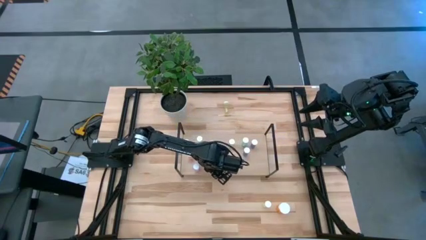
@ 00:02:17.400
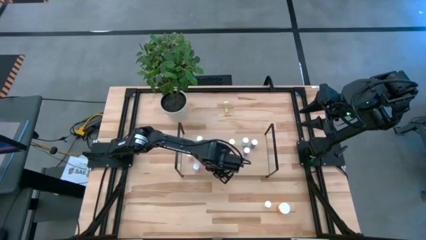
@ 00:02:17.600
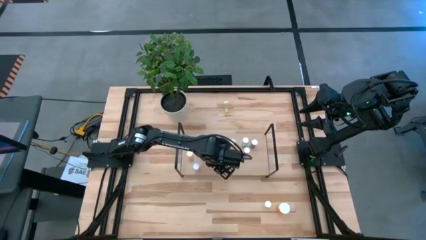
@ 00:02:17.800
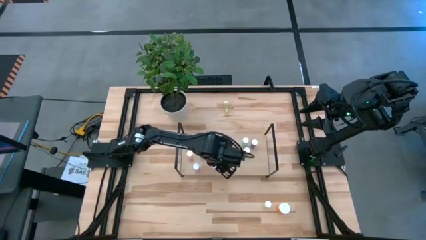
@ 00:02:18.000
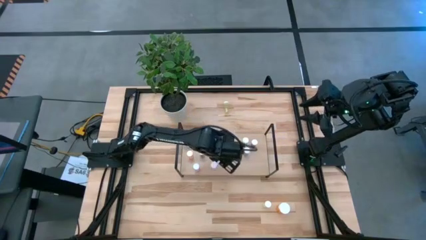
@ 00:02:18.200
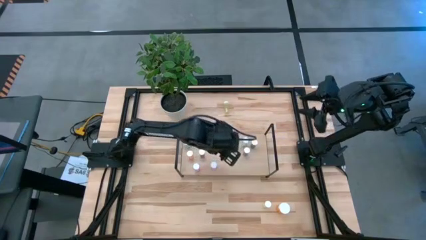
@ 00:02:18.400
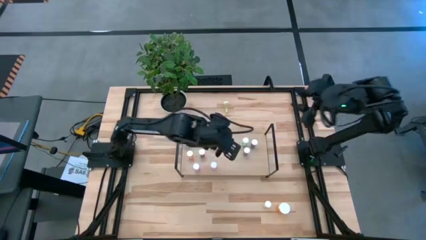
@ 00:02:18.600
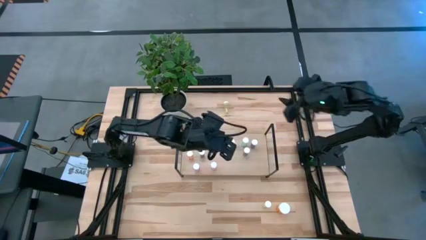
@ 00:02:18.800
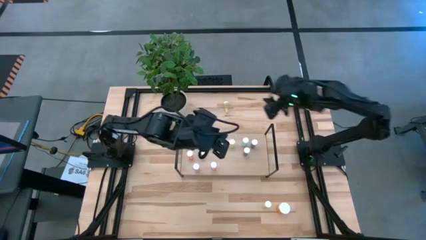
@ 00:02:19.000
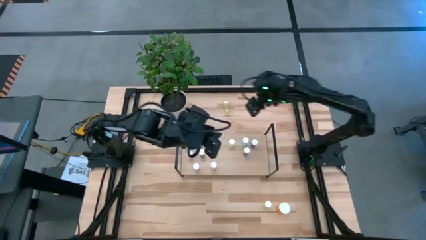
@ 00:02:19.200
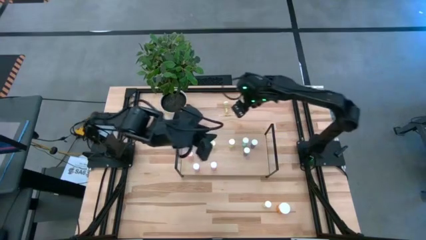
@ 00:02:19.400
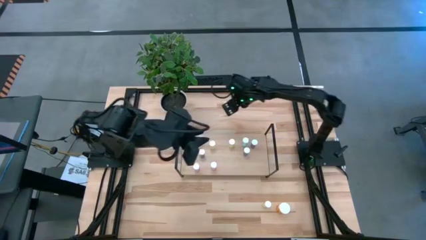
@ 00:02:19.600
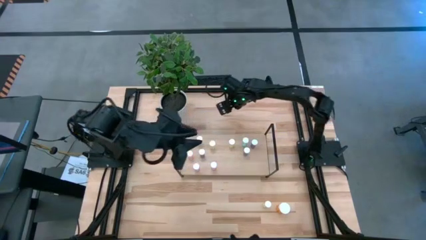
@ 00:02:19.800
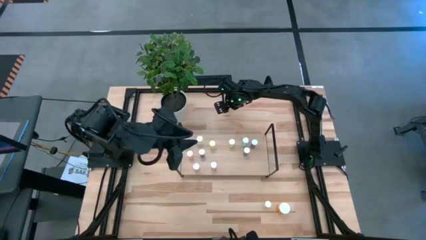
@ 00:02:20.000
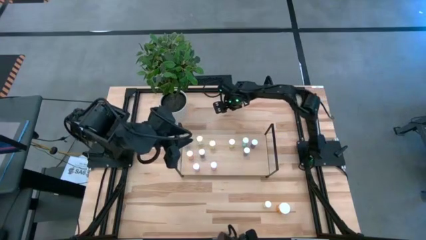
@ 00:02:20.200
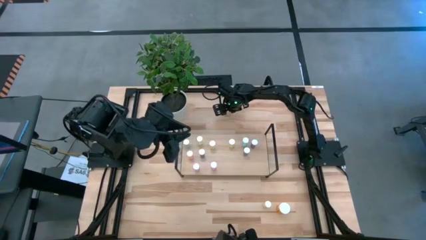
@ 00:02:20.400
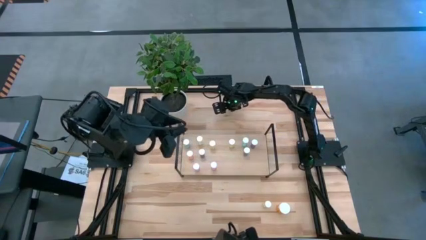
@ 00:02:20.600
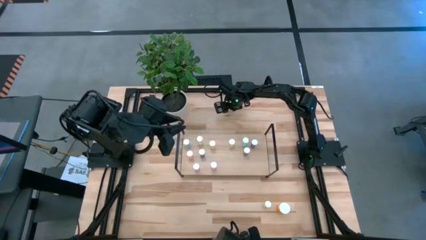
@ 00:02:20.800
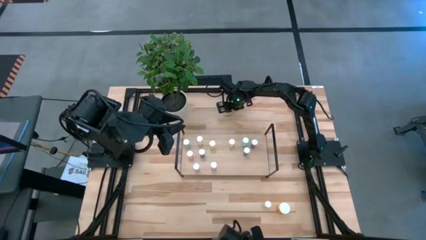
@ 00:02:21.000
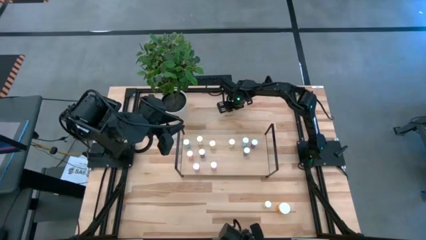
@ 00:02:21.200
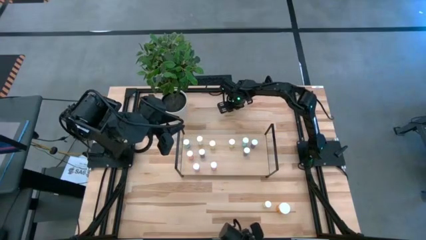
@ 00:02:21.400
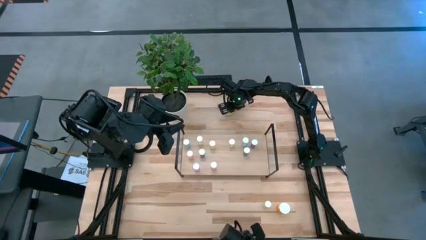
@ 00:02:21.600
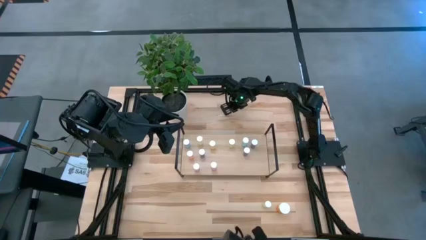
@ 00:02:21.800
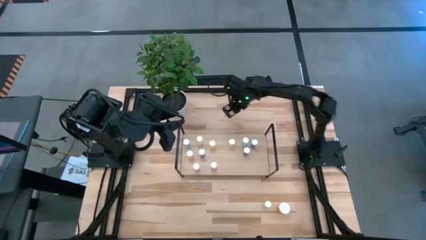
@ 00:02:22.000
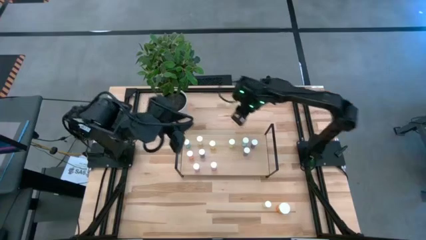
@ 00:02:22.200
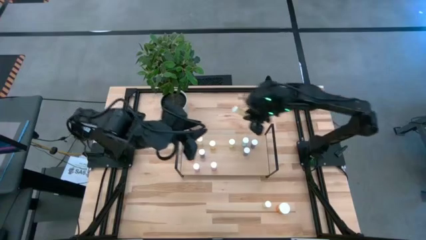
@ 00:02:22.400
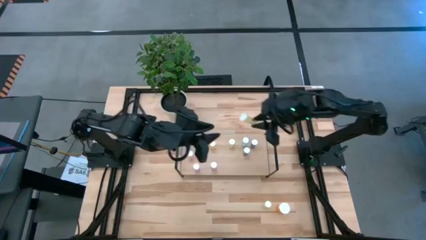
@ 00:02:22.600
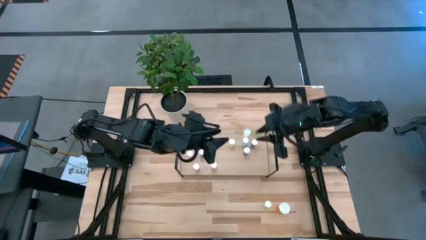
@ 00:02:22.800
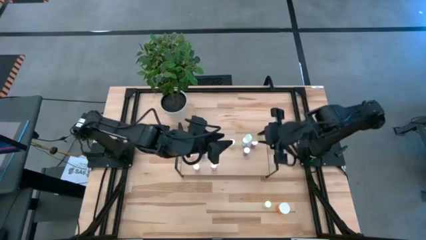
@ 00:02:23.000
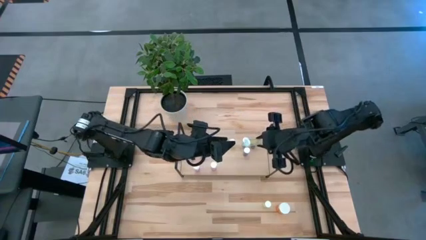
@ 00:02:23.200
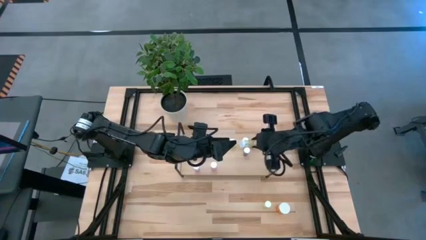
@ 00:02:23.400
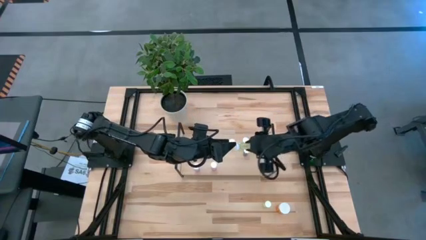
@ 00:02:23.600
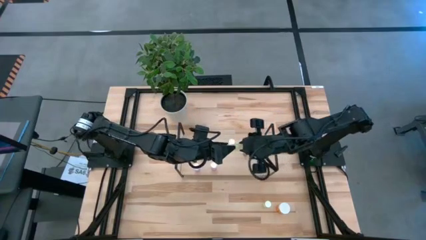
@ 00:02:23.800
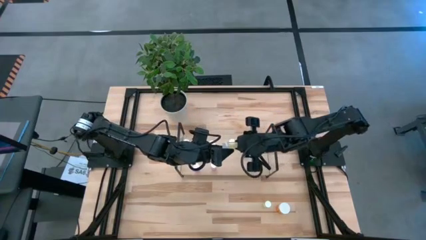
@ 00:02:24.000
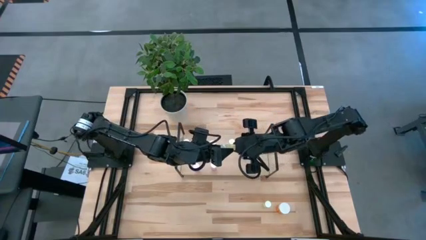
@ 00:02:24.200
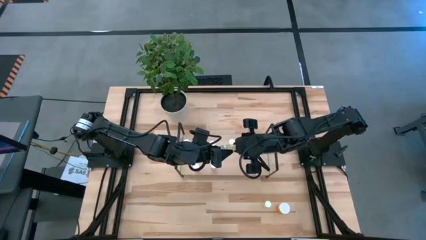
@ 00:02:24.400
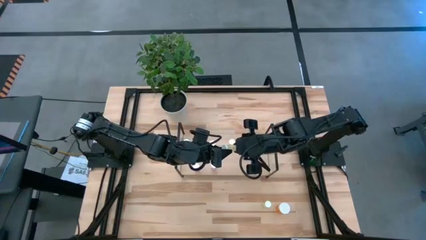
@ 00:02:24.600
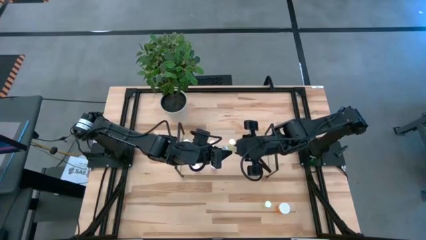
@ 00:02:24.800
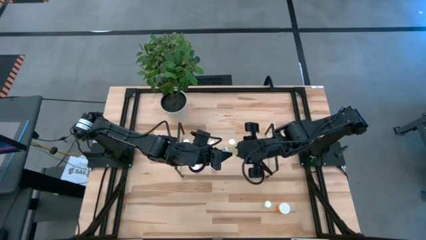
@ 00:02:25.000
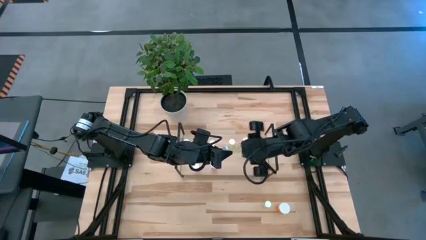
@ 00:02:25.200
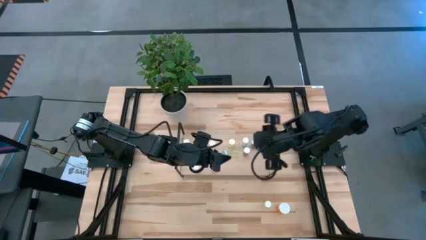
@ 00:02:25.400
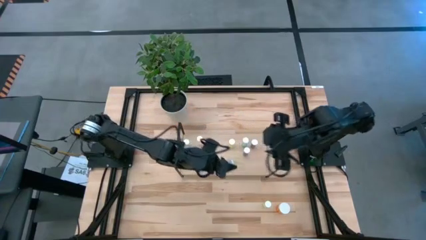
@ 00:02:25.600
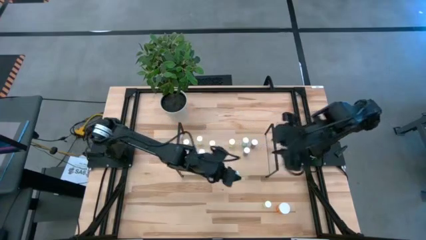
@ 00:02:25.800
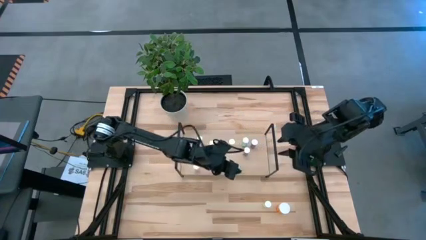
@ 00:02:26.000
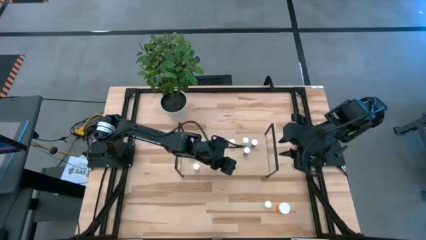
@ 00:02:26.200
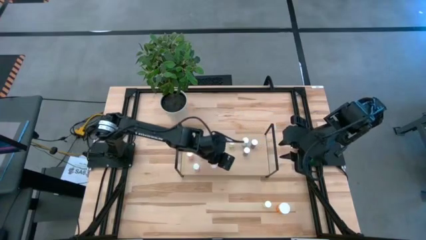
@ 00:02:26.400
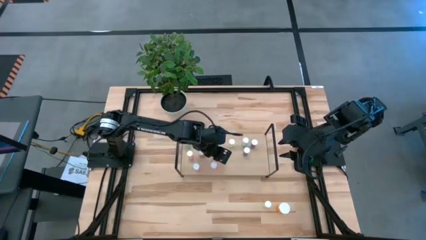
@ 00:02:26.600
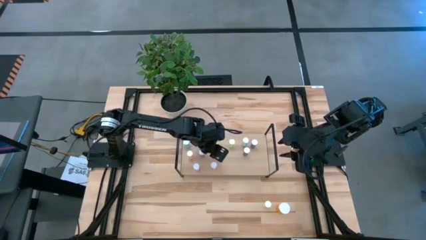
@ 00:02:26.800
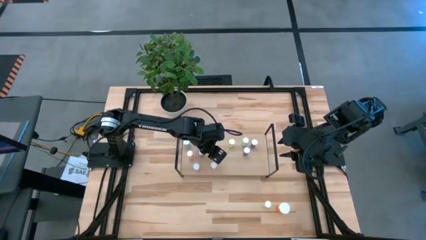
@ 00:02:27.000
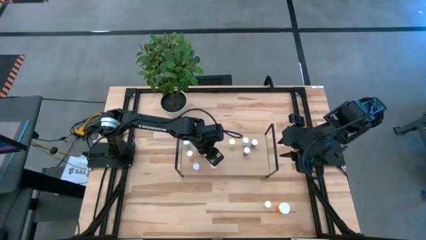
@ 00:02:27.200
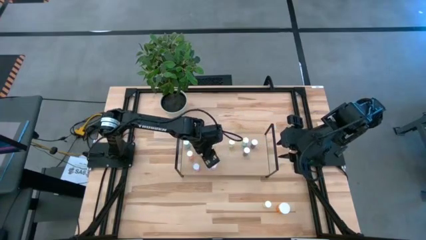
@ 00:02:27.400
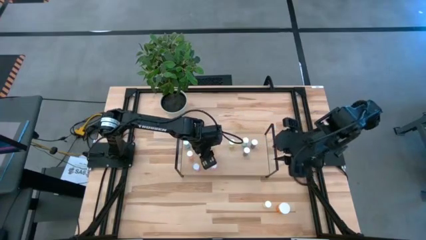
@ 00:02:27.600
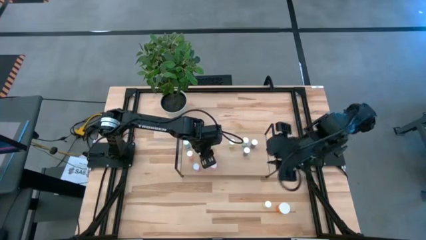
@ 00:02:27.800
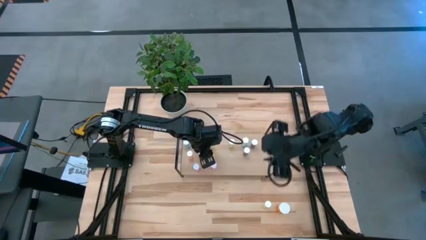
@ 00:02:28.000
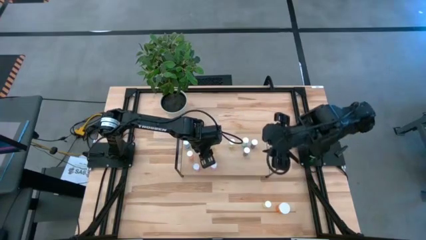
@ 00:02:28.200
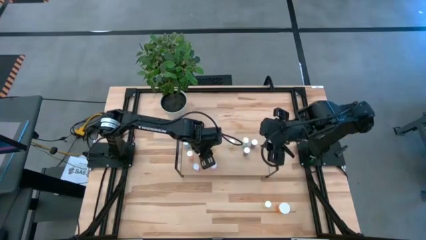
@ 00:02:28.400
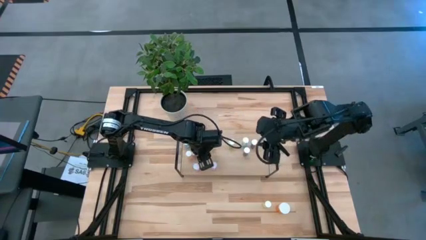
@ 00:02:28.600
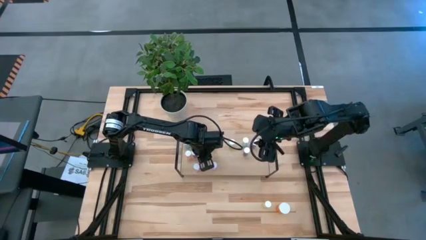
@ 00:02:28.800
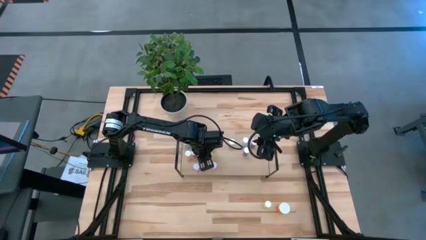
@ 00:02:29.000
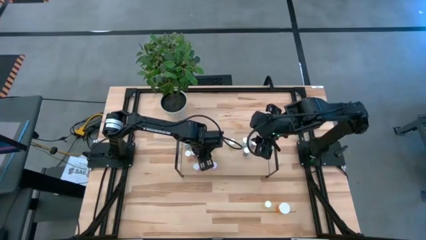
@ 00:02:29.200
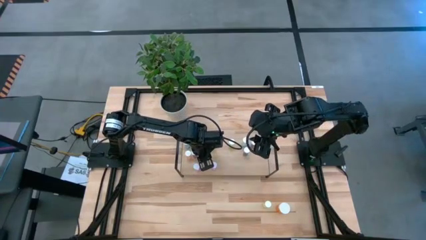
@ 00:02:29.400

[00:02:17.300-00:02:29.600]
Task: Pick and place medicine bottles onto shelf by color
Put the yellow pill bottle on the shelf

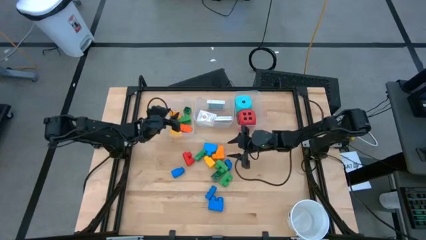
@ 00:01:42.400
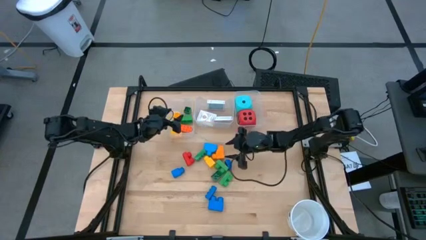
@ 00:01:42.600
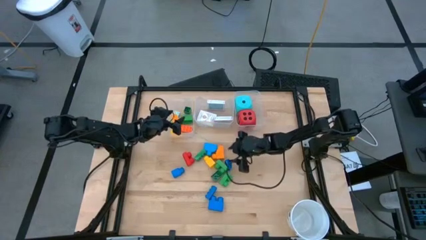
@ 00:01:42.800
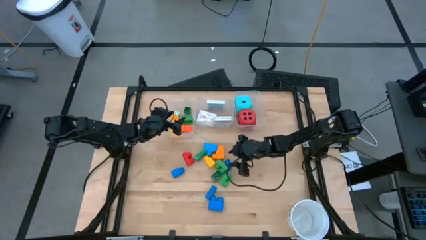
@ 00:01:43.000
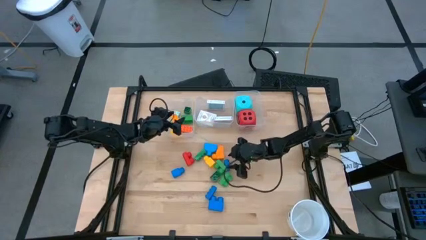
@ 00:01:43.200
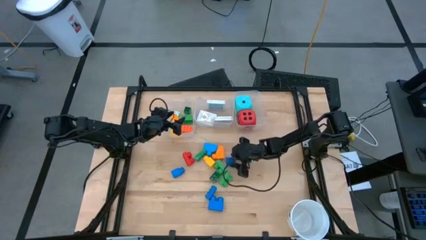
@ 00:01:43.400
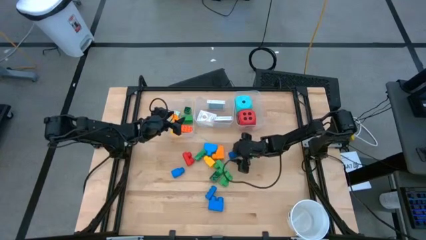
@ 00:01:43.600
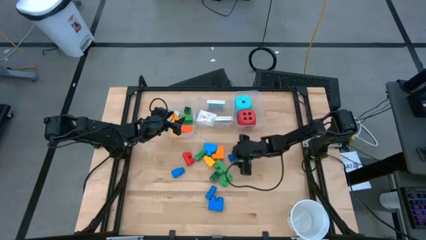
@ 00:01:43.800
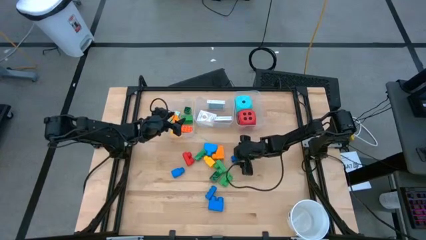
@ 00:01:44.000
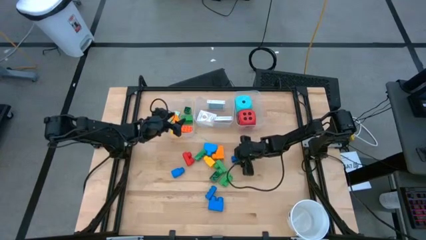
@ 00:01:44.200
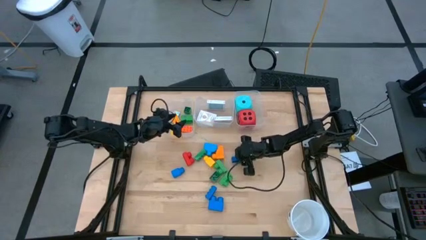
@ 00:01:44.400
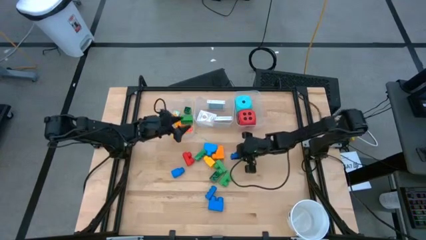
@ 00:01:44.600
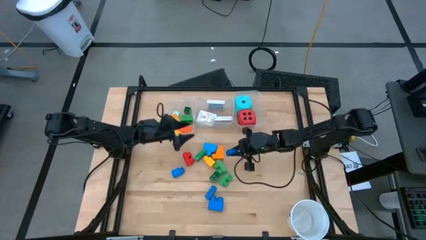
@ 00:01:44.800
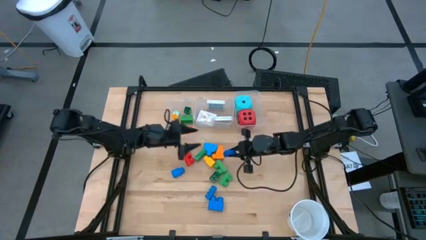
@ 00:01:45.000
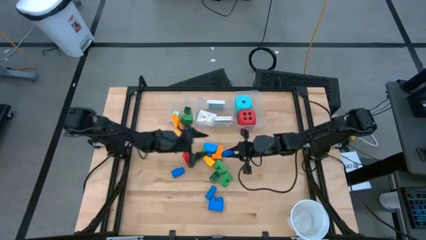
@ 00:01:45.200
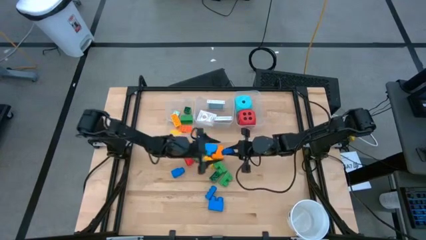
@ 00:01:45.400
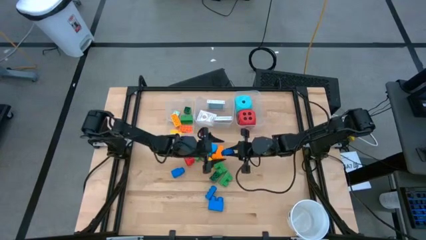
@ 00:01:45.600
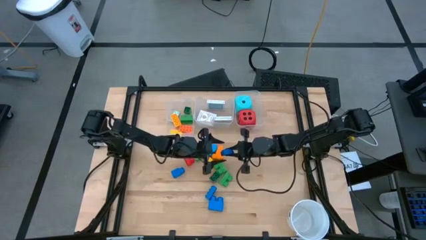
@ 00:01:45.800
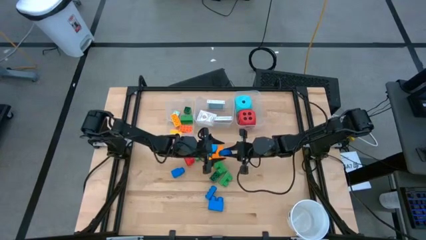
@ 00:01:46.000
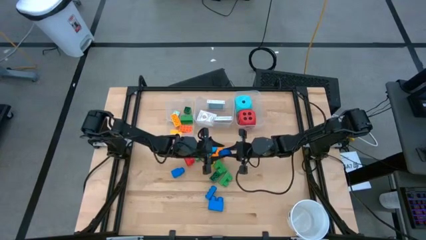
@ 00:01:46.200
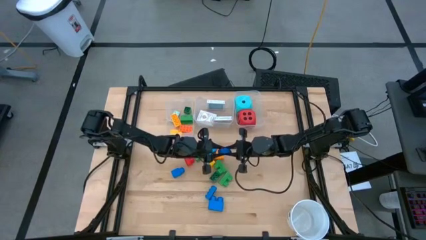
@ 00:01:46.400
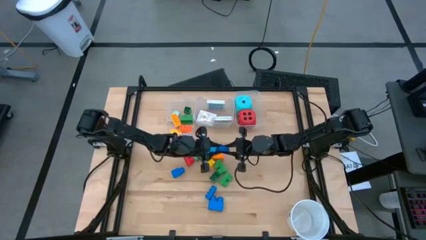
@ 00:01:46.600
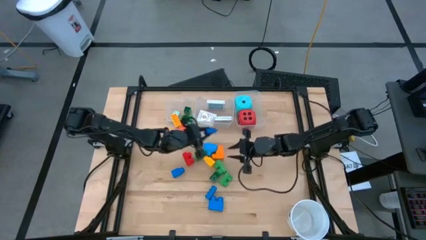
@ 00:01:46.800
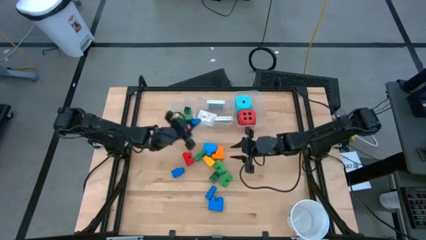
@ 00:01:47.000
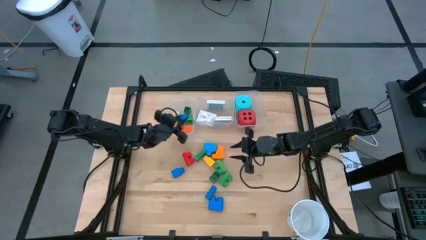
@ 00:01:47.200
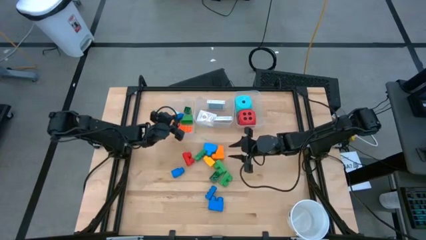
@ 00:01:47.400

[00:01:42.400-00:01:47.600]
Task: Pick & Place Toys
Put the blue game piece into the left transparent bin
